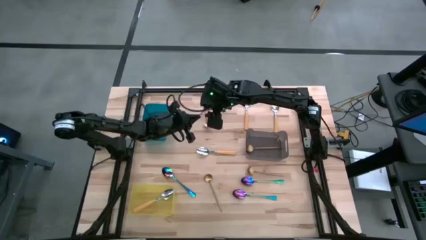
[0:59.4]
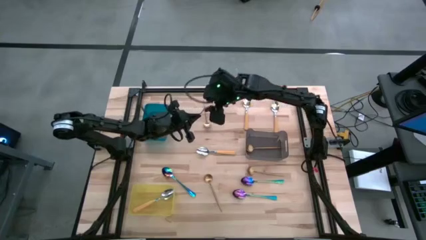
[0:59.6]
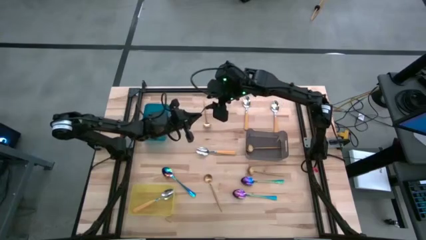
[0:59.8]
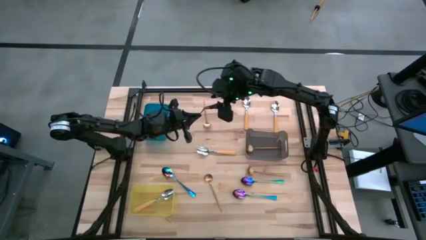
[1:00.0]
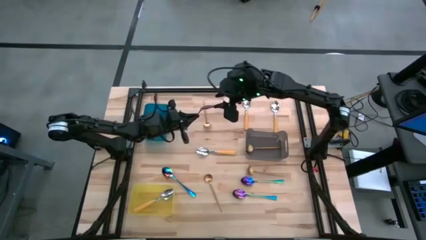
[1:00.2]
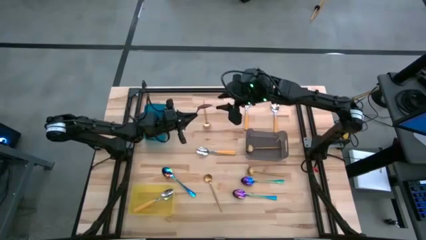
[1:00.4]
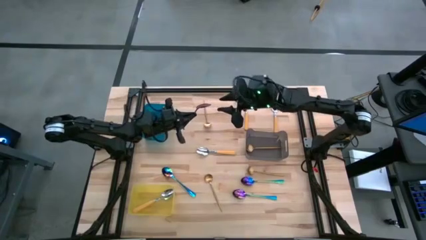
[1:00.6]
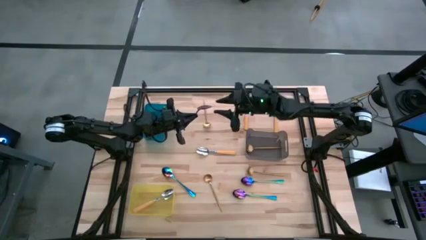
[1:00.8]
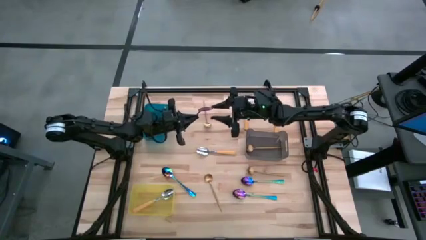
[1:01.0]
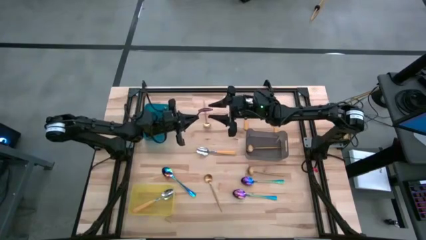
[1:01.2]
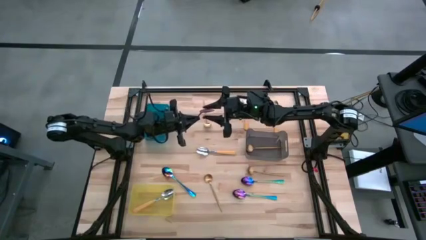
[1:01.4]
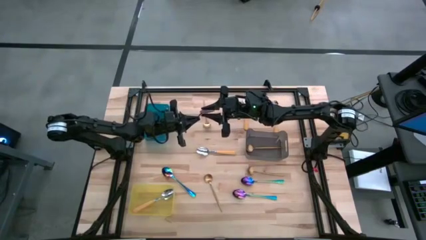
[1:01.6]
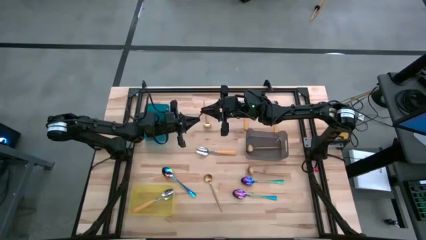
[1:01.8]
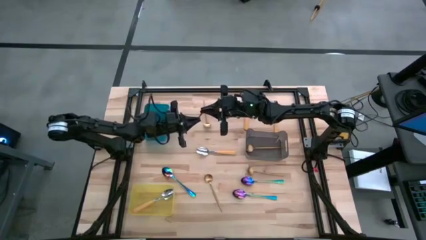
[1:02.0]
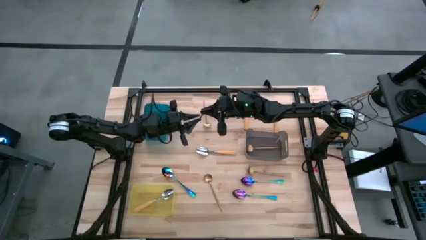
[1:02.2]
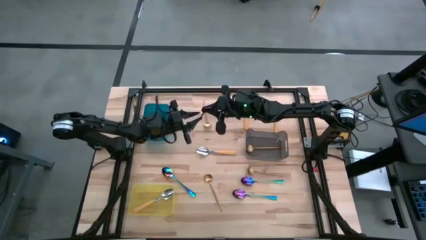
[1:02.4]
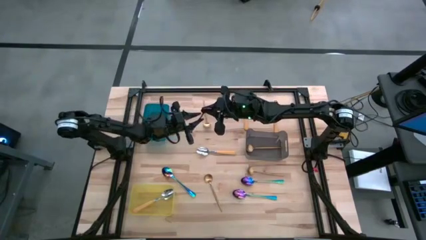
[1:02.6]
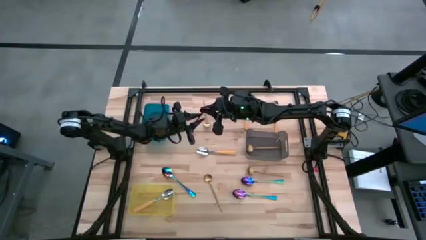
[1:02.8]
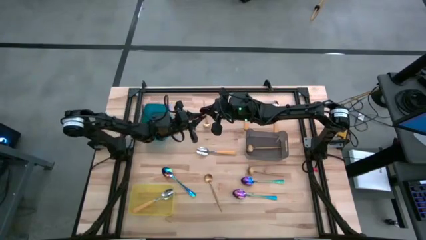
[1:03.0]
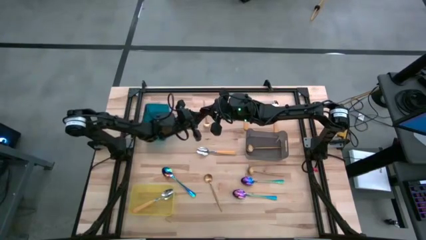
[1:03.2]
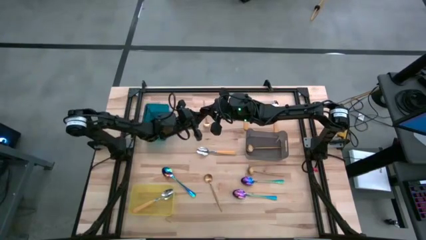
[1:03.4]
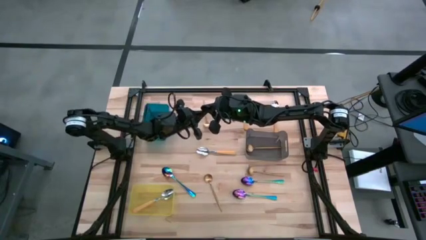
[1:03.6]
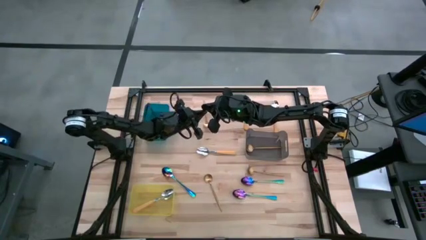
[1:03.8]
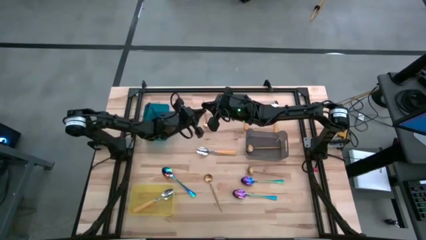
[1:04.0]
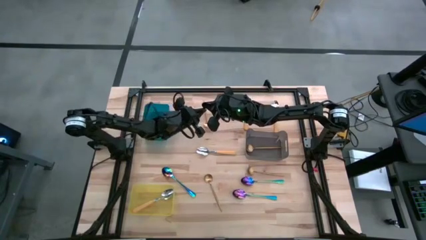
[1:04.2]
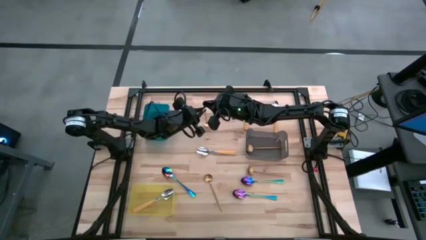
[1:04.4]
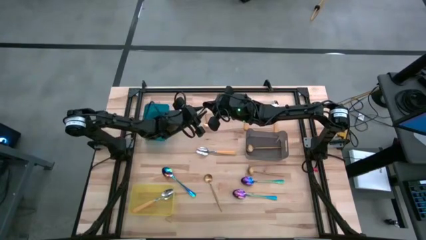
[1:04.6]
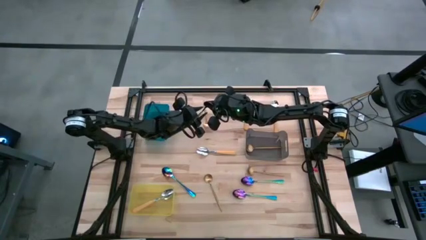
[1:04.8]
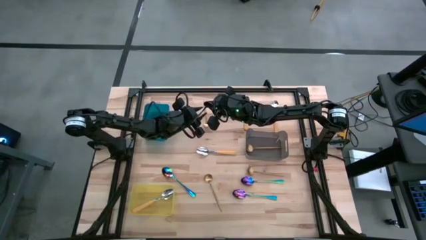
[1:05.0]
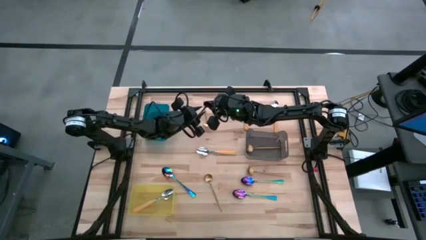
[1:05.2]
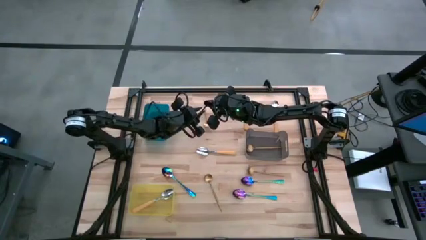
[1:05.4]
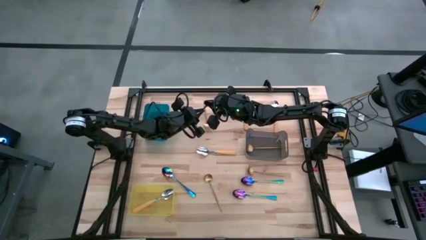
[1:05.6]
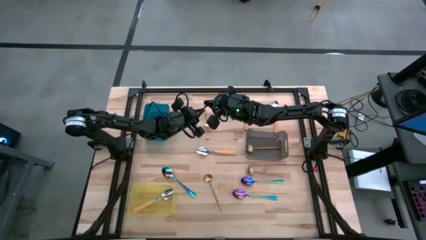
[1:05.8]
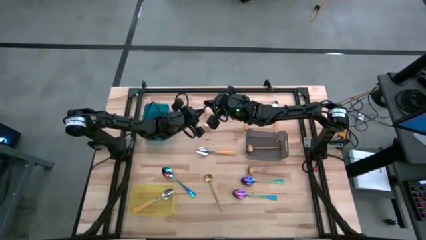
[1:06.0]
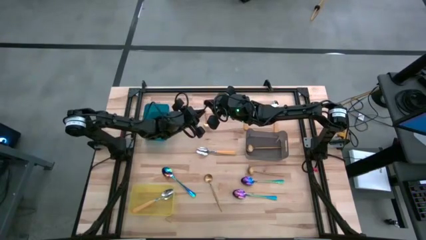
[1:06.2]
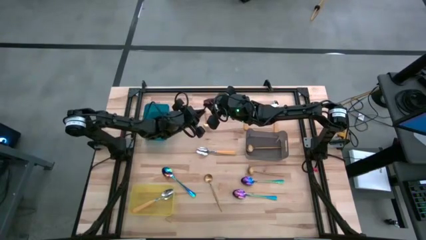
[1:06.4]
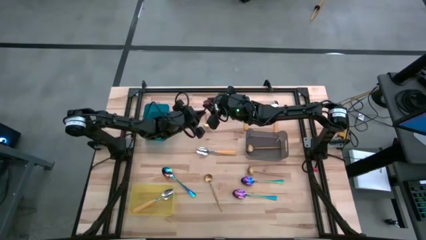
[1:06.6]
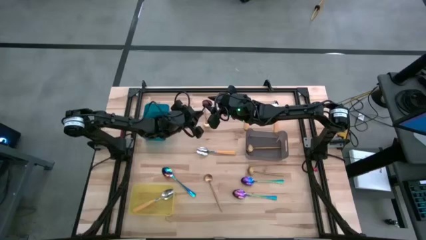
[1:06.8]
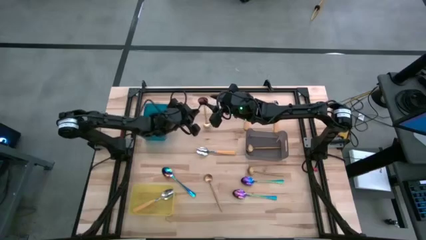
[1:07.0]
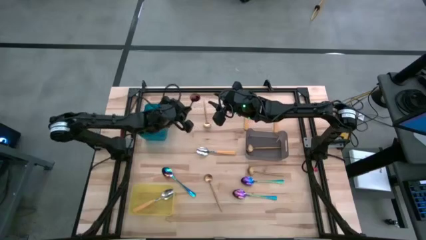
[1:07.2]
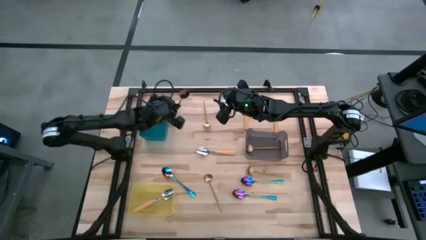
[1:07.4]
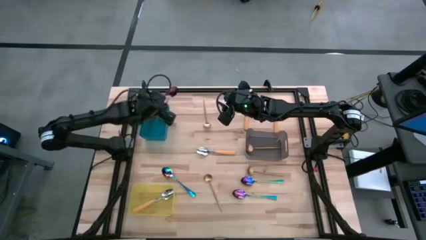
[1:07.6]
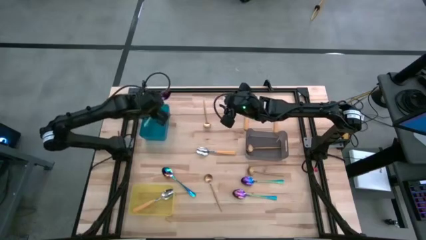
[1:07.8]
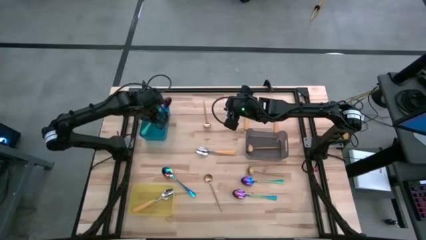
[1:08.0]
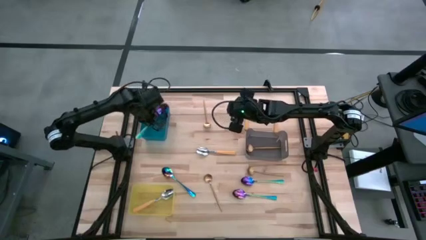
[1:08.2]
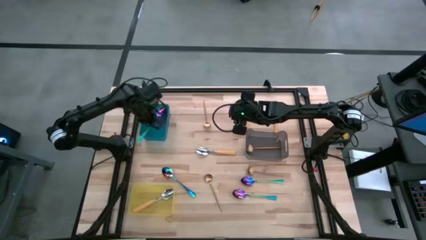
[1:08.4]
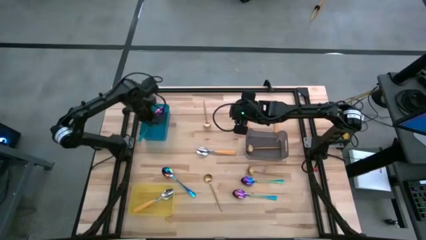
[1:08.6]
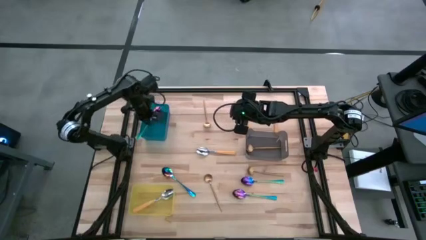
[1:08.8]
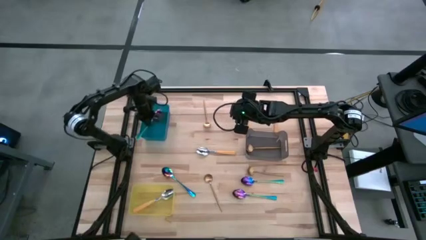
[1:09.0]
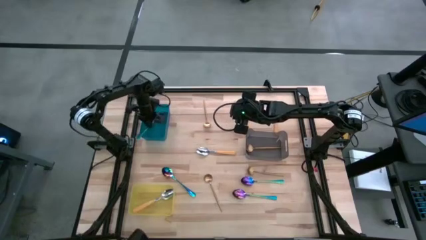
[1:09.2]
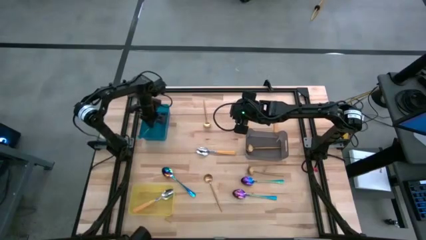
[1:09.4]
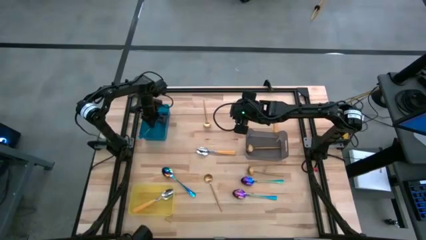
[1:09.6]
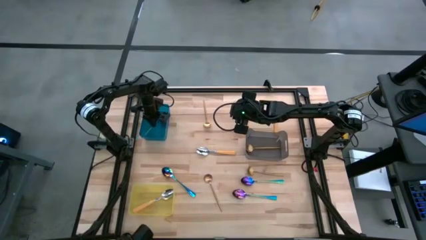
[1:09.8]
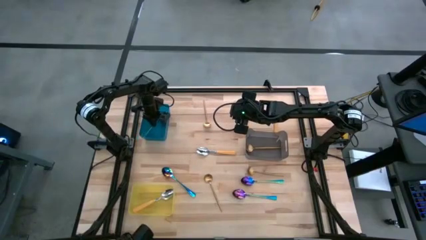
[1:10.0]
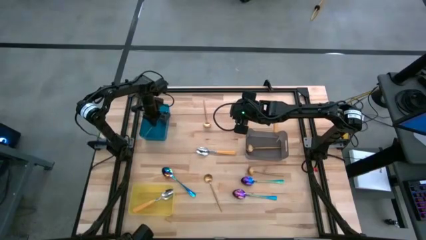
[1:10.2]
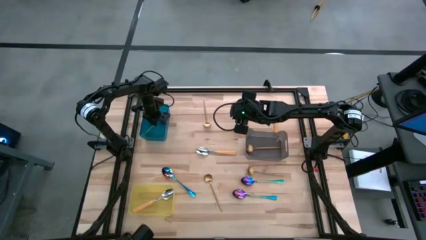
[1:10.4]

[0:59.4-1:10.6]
Task: Sort silverware by color (type)
Put the blue spoon into the blue bin

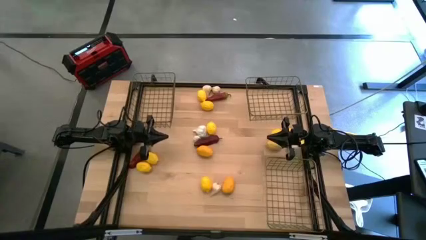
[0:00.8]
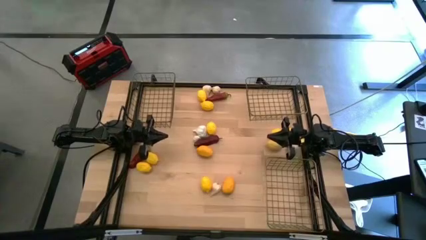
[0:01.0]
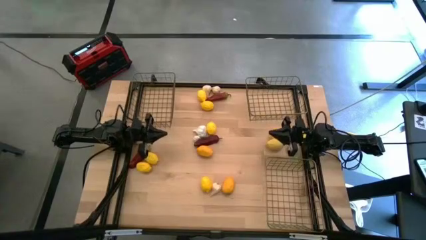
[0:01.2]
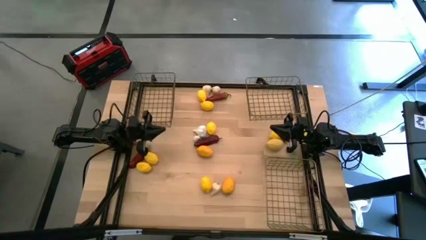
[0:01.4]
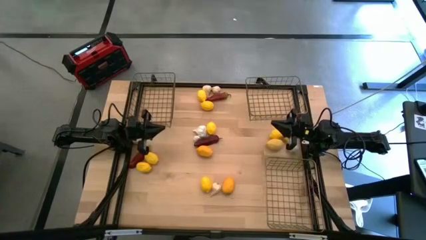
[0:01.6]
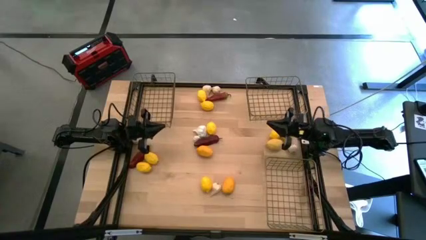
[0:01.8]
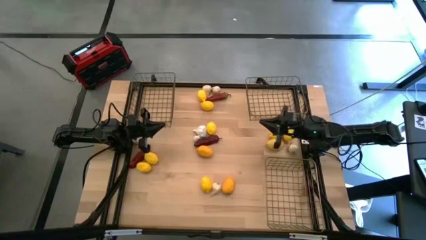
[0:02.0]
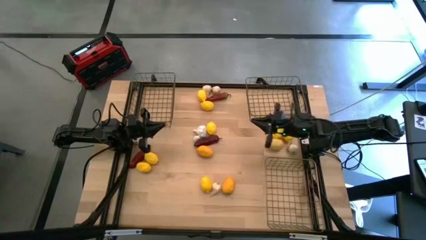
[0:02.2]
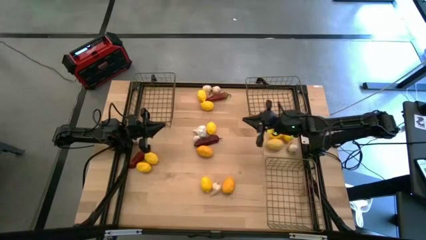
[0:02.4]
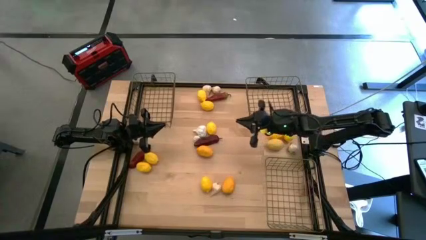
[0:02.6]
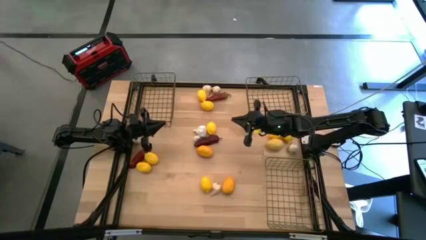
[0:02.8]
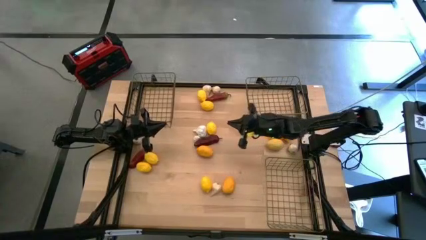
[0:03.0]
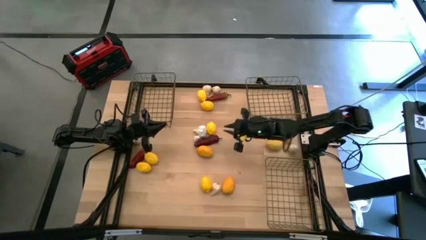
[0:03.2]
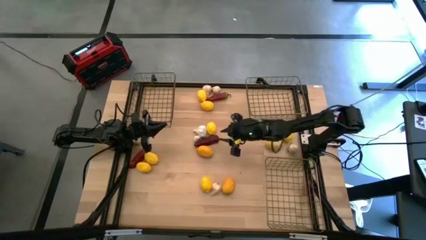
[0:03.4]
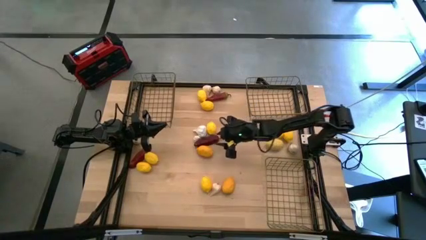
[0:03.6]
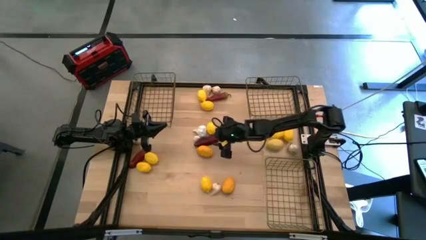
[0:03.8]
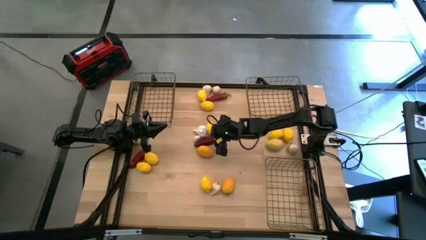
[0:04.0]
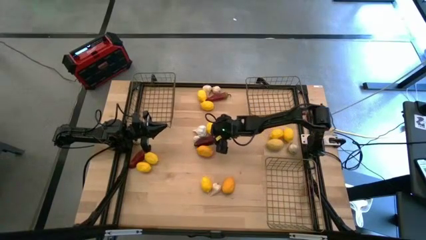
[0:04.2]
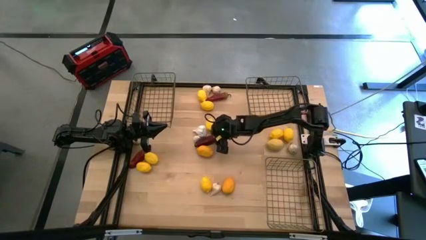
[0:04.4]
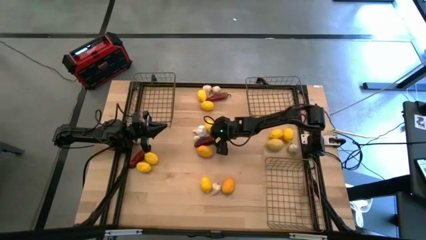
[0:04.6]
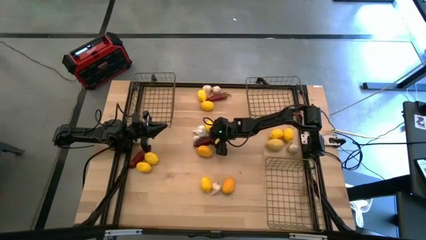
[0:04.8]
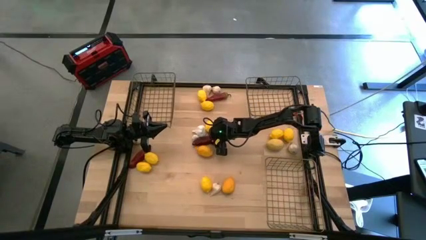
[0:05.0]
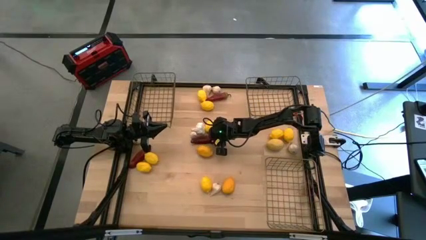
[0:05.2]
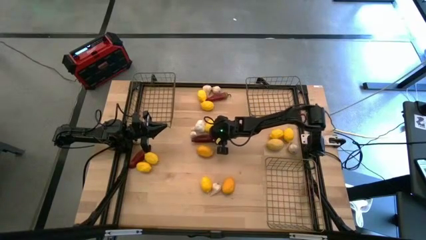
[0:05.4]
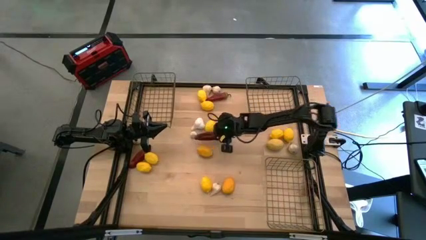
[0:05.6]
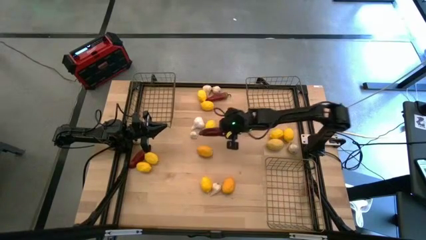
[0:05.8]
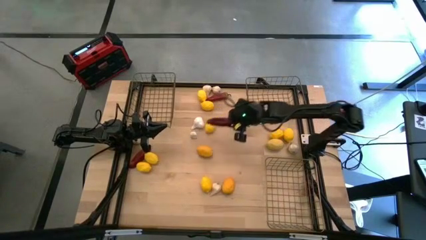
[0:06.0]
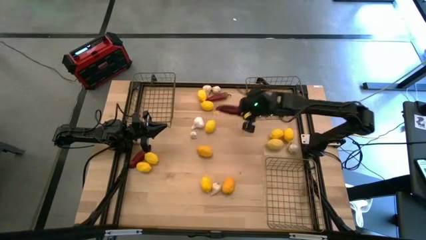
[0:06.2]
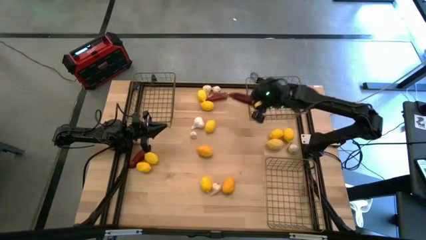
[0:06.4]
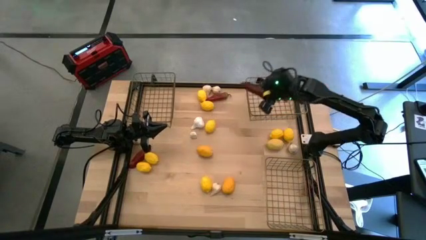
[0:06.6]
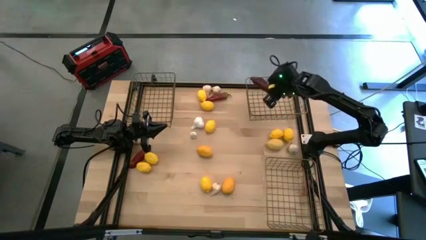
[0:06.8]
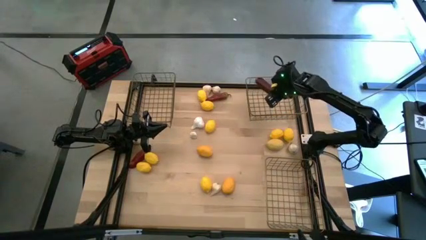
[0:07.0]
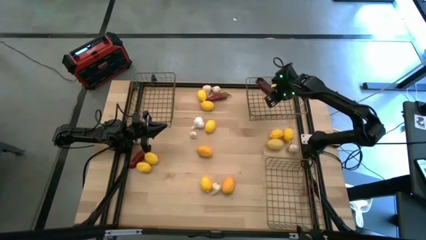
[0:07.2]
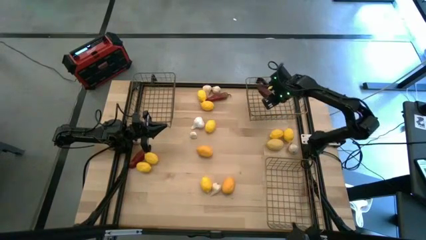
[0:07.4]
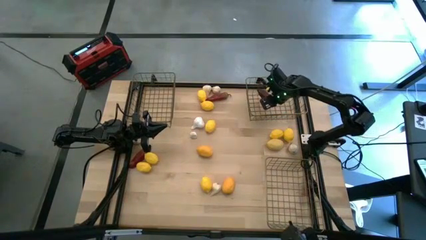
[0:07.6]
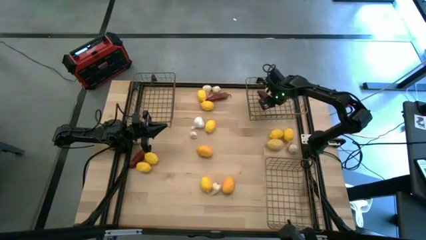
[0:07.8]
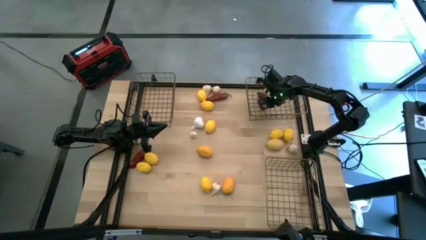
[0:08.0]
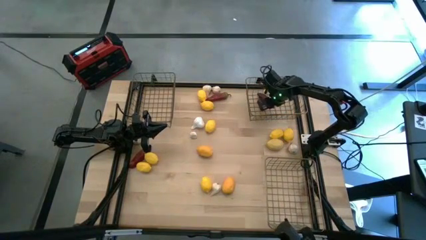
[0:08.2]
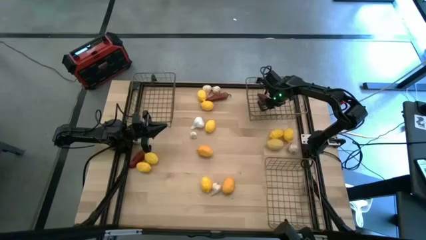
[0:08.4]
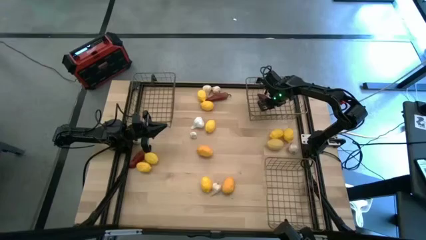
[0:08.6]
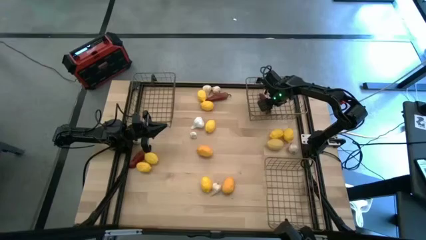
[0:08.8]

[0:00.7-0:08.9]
Task: Sort produce into baskets
Put the red chili pepper into the top right wire basket
